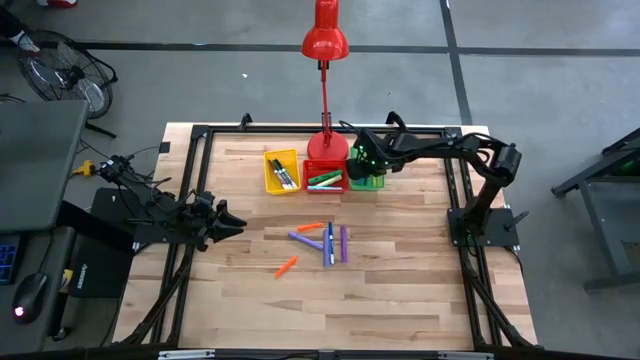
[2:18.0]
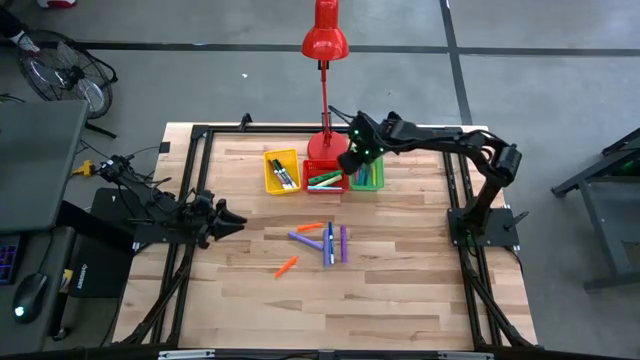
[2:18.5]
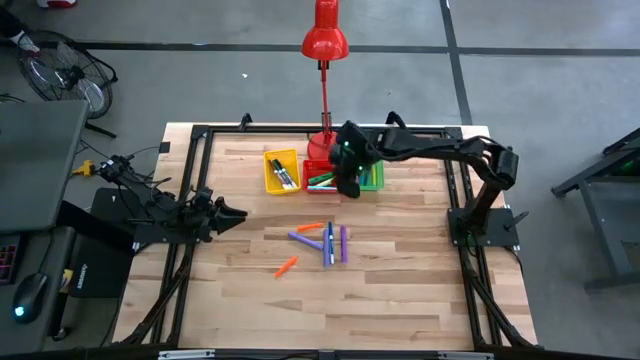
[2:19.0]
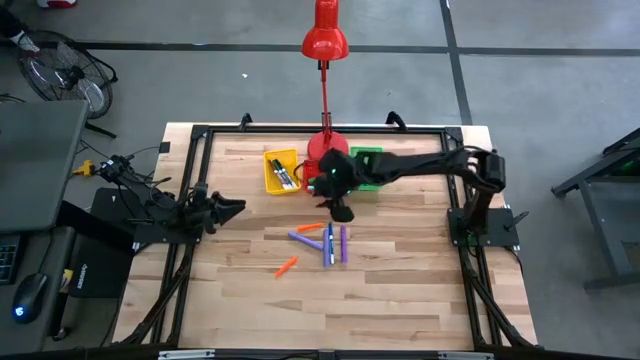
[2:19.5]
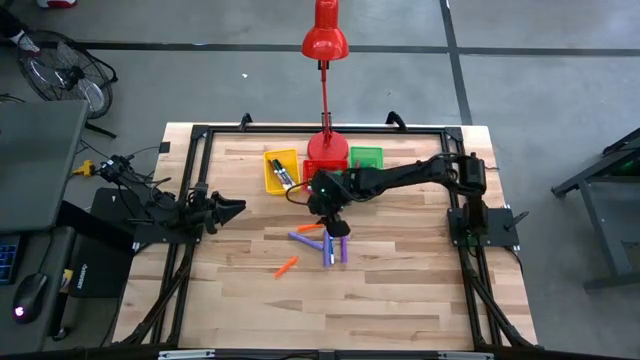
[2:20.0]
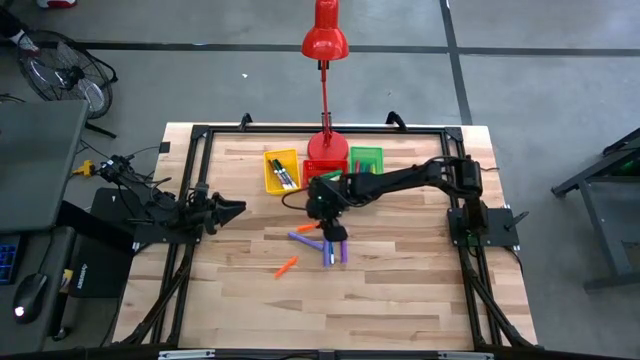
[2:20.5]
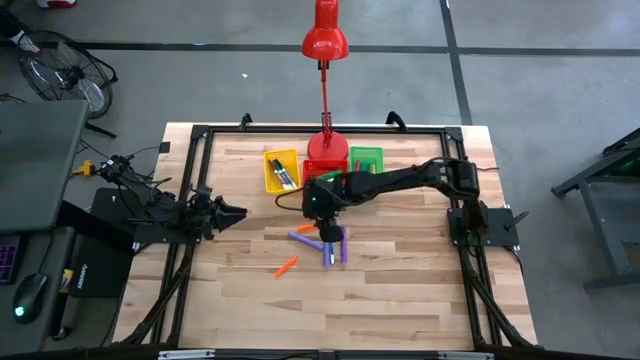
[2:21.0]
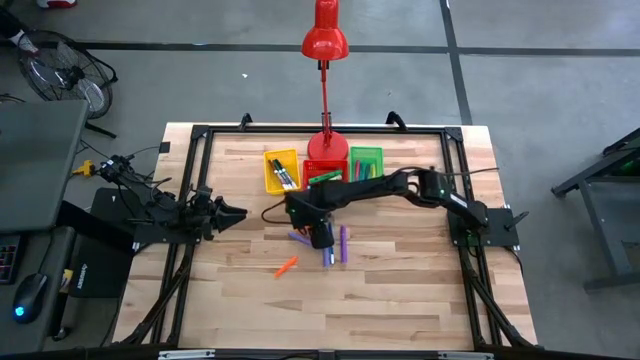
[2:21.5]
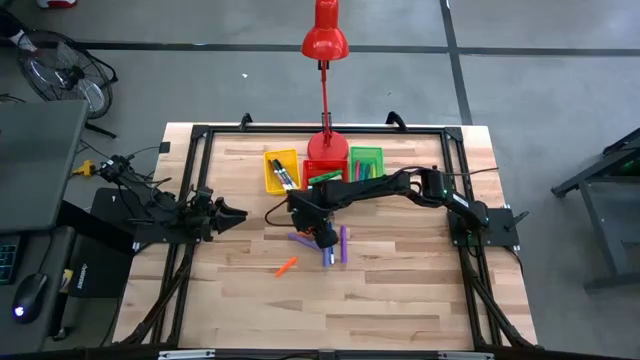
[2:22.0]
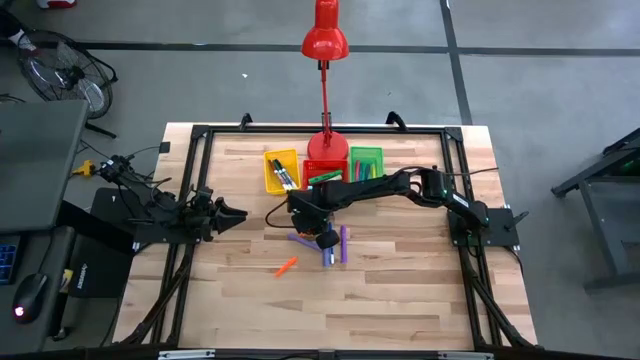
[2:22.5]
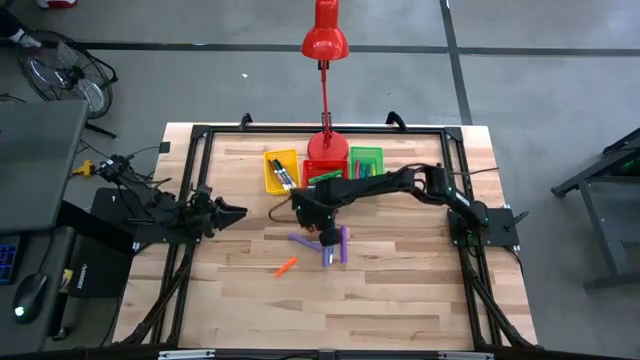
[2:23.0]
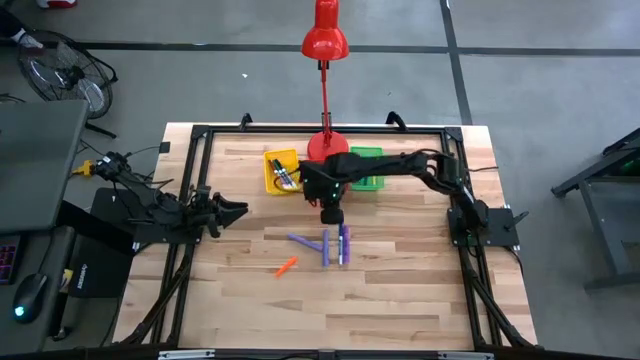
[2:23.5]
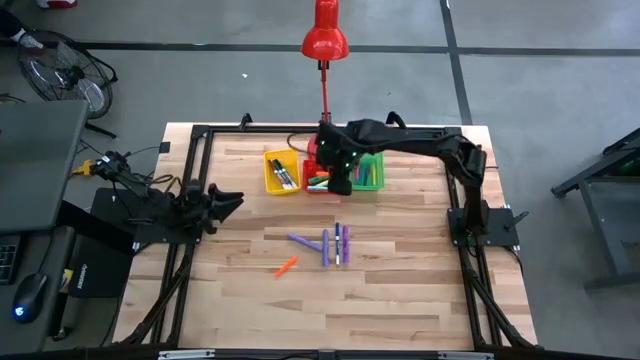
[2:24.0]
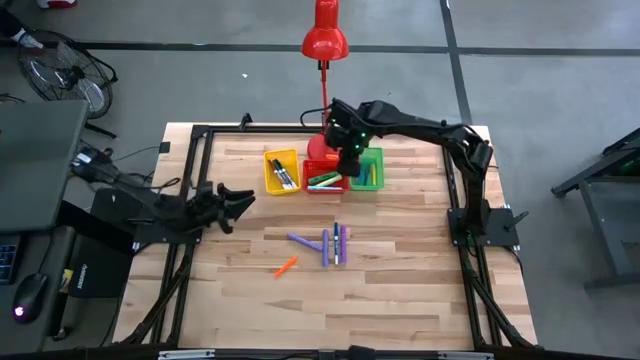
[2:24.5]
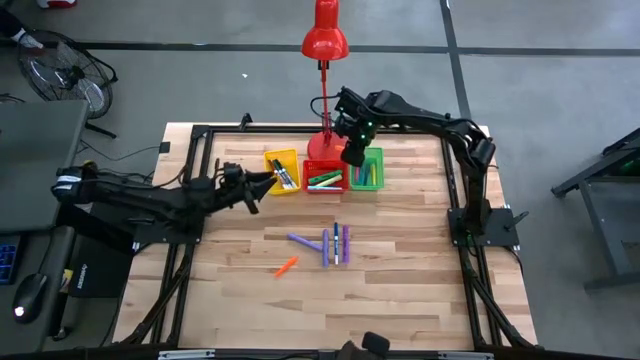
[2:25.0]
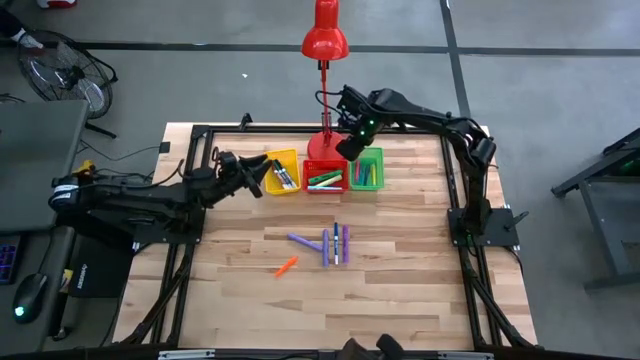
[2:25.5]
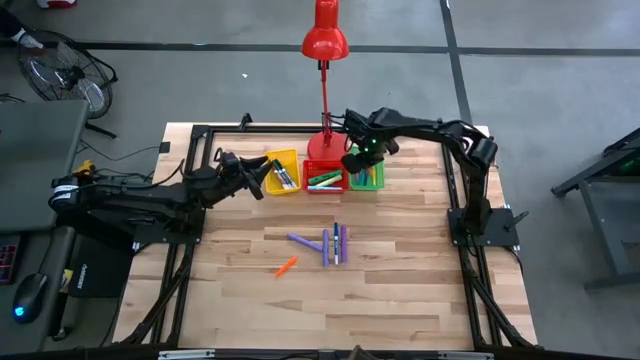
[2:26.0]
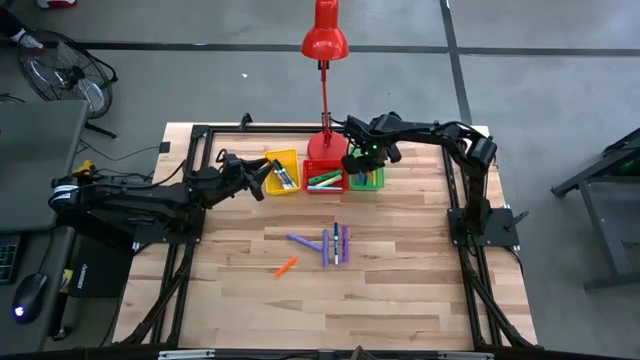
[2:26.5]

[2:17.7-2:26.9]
Task: Pick & Place Markers
Put the top orange pen into the green bin

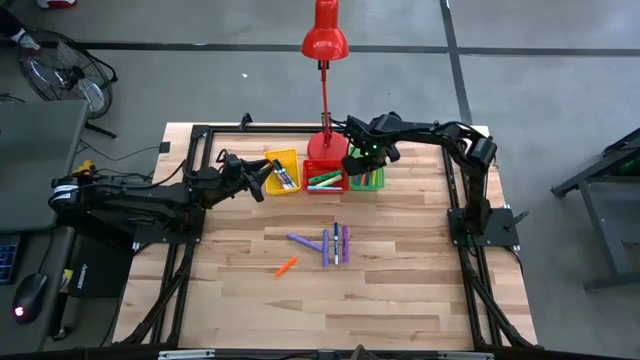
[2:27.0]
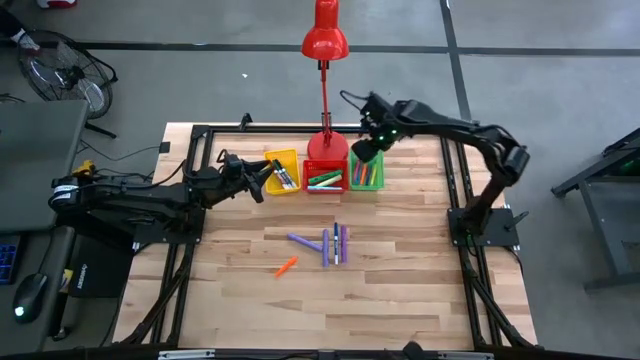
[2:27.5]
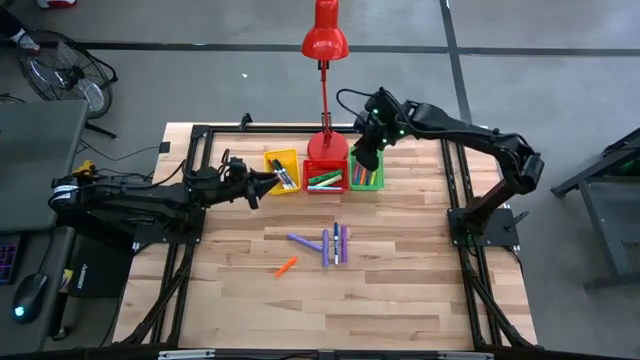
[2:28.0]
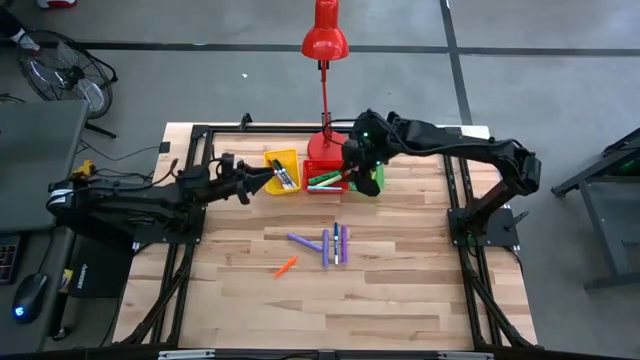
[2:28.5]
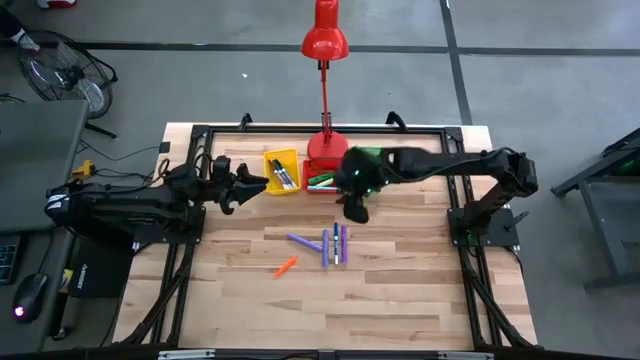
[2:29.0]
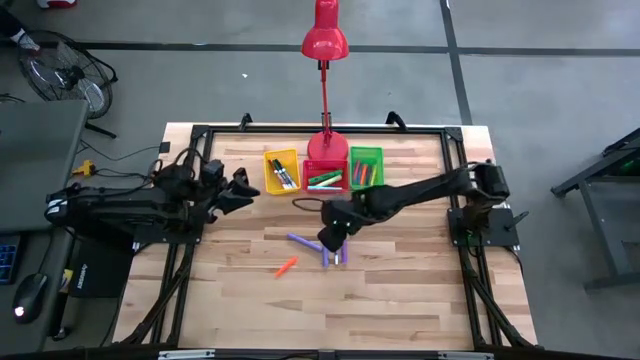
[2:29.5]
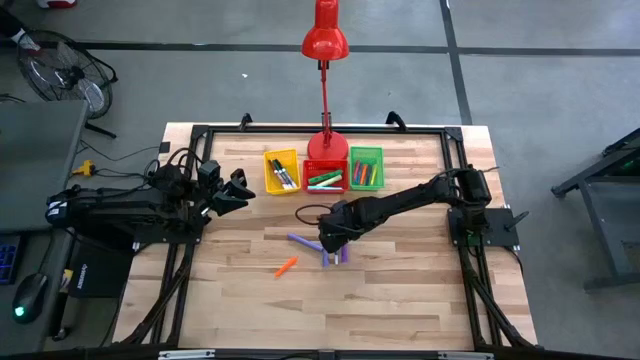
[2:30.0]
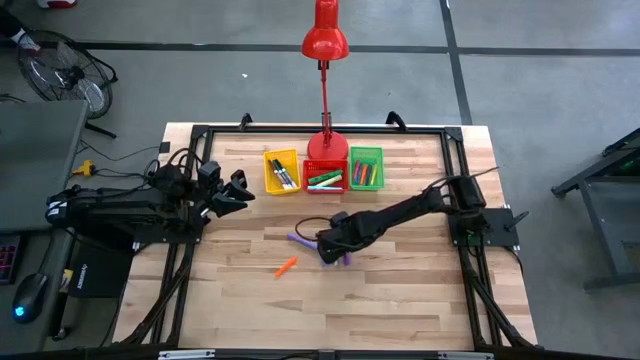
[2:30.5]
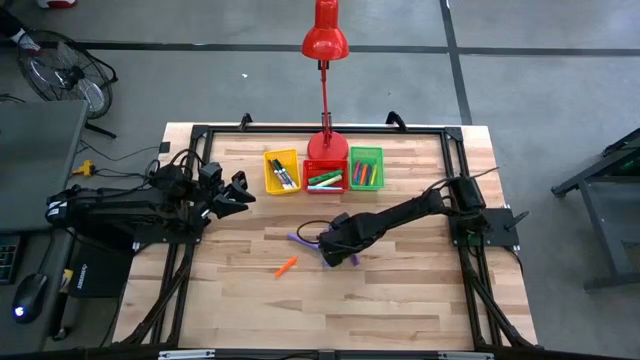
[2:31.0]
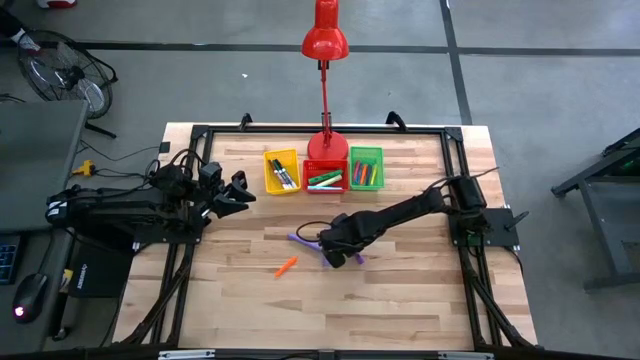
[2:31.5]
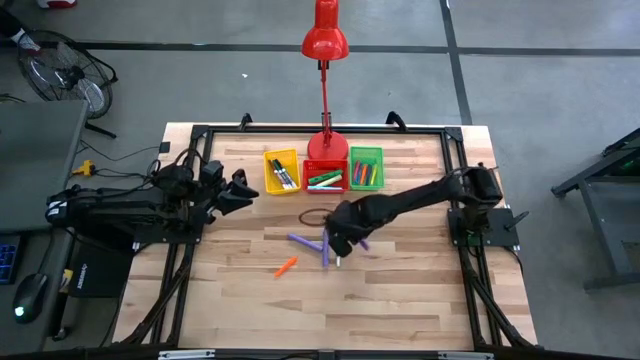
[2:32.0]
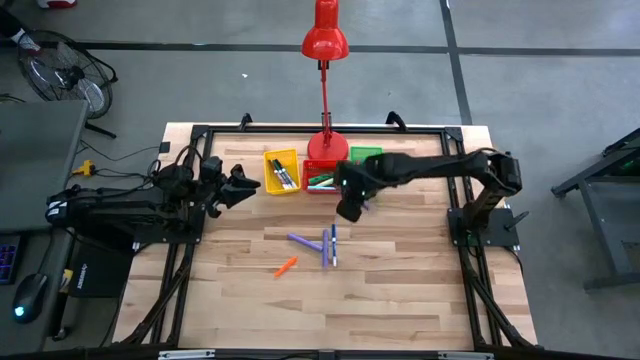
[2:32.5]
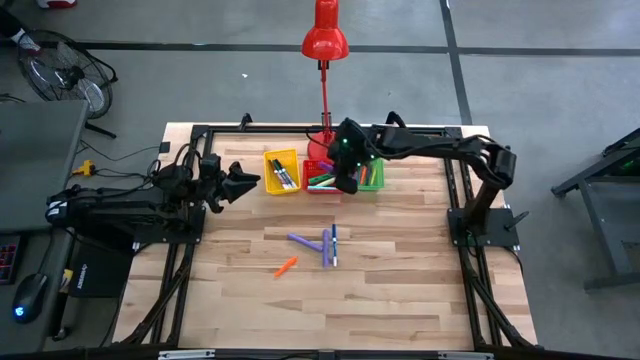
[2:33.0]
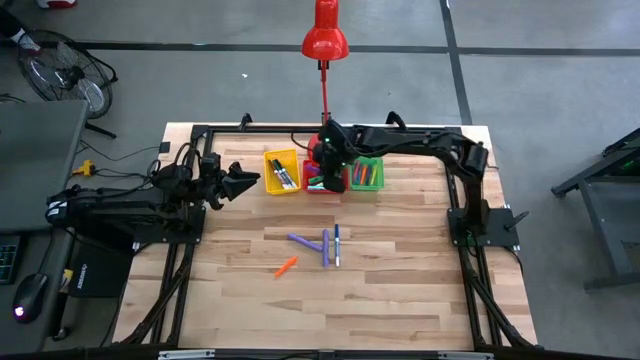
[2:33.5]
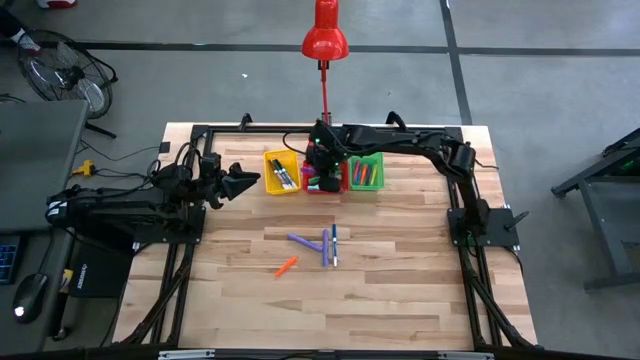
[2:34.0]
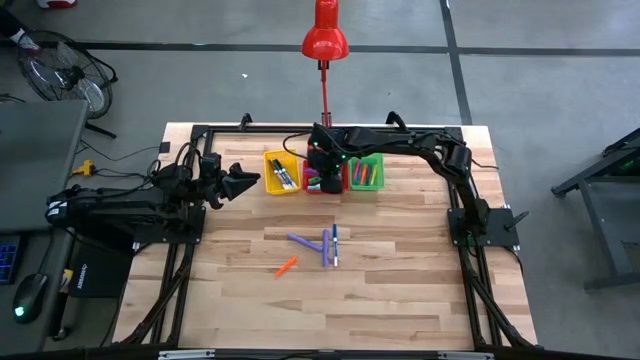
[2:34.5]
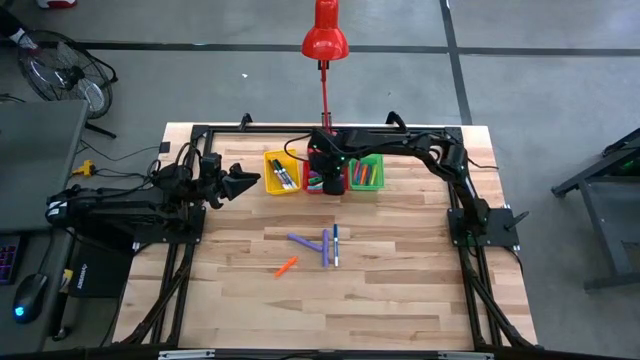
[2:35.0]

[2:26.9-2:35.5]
Put the violet highlighter pen into the red bin

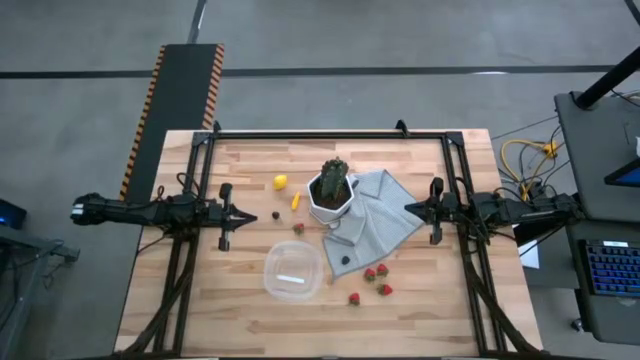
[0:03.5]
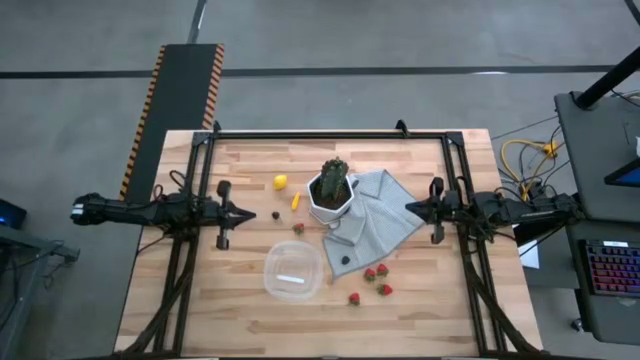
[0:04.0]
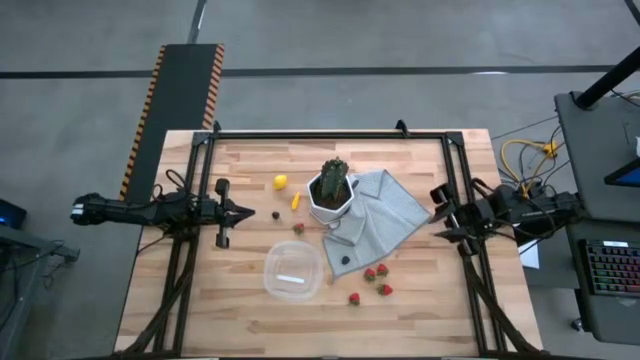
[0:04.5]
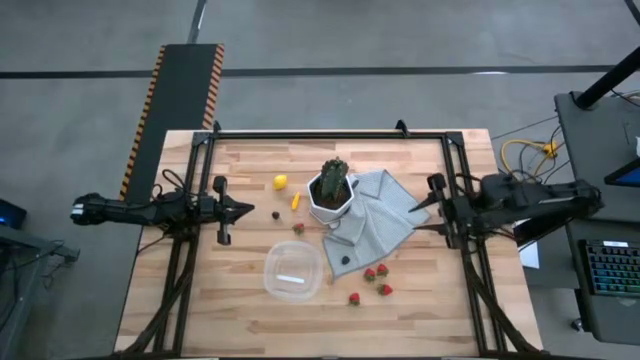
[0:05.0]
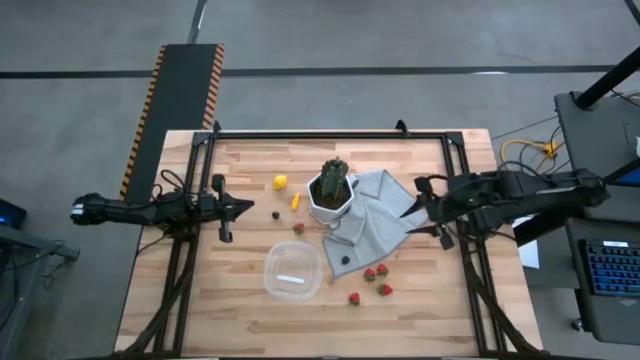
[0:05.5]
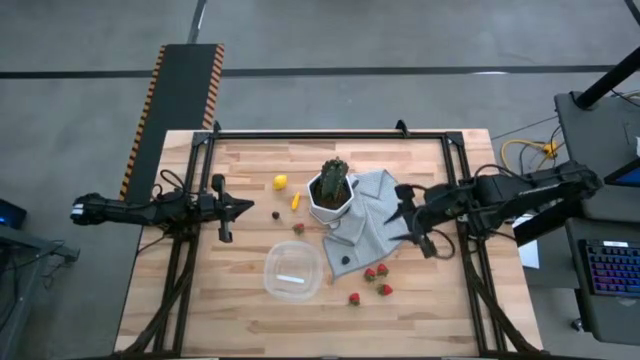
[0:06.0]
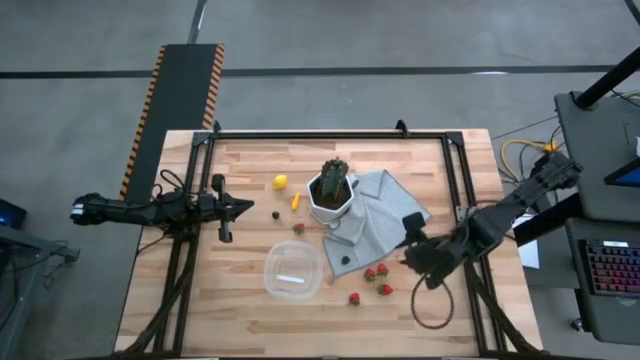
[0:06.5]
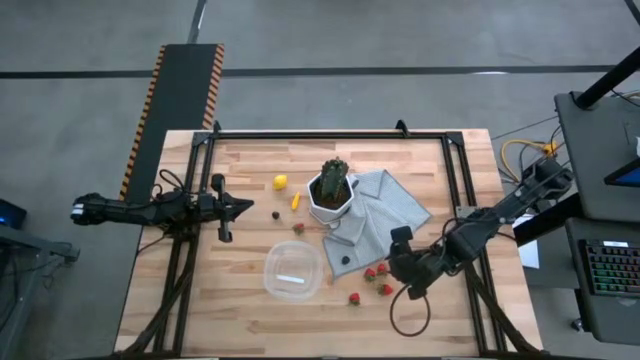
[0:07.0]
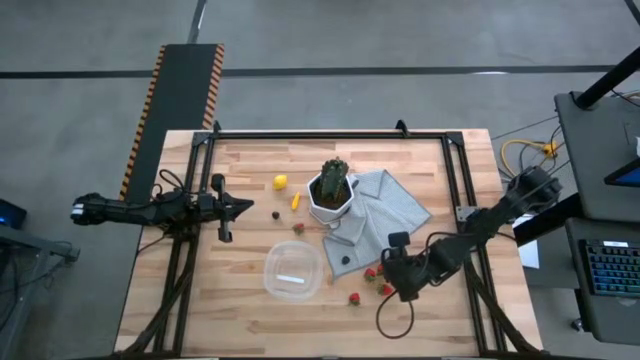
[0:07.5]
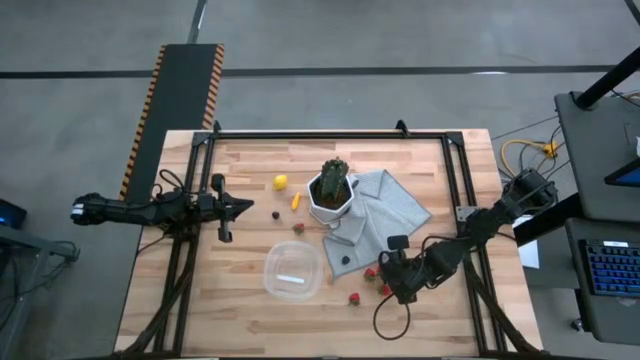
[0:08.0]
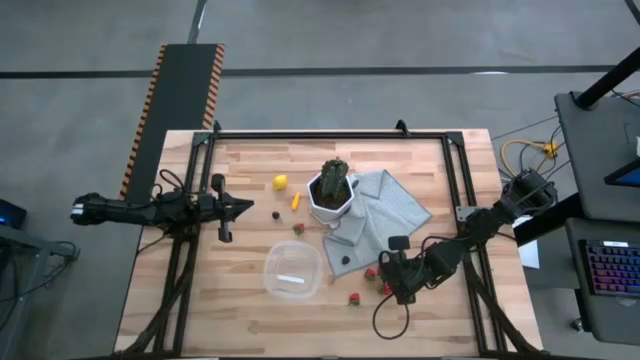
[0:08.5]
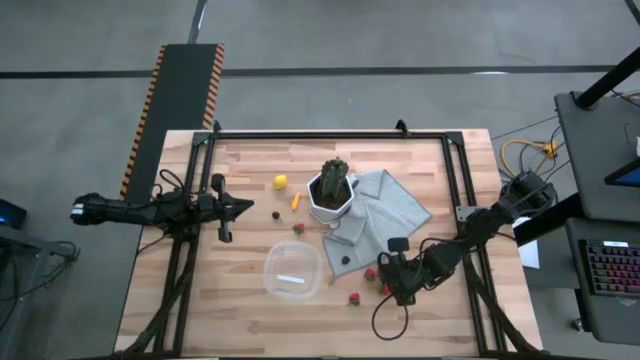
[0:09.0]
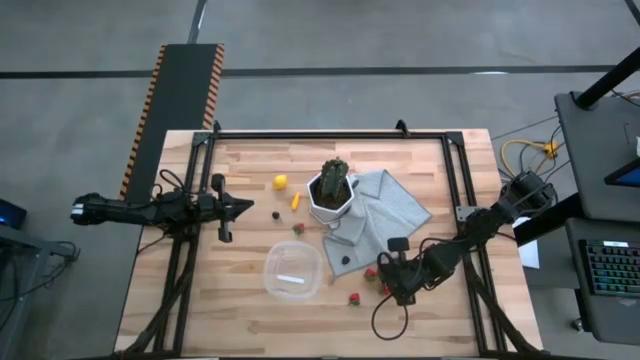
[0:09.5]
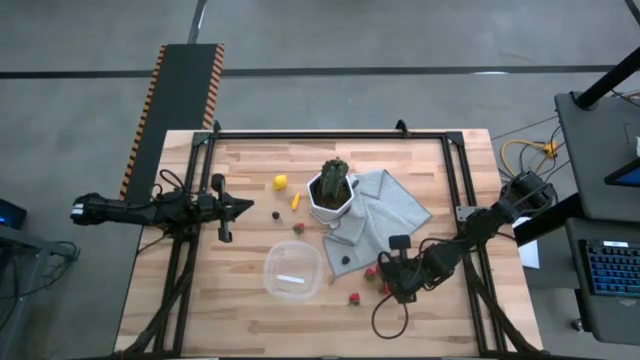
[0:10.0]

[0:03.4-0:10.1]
Task: Pick and placing Produce into tupperware
Put the strawberry into the transparent plastic container
